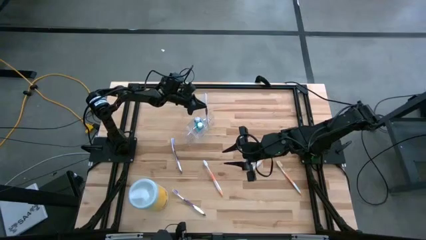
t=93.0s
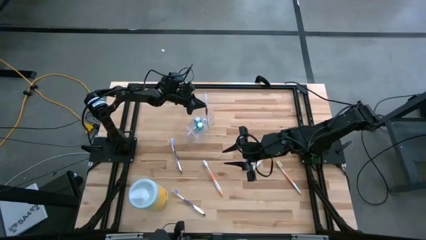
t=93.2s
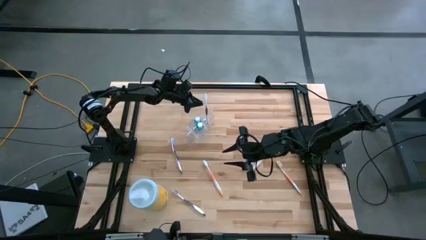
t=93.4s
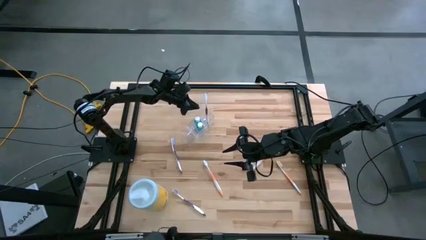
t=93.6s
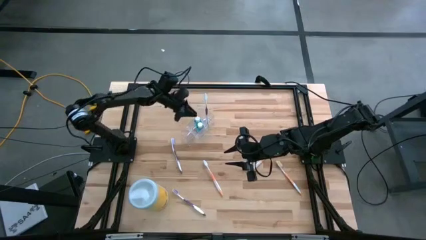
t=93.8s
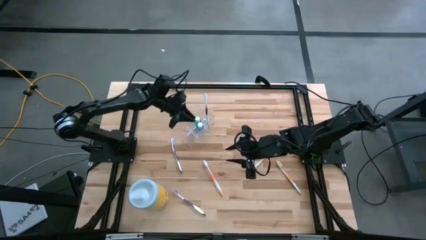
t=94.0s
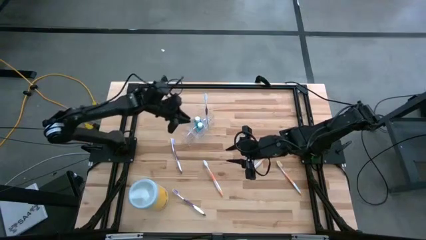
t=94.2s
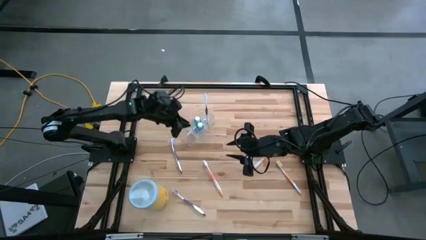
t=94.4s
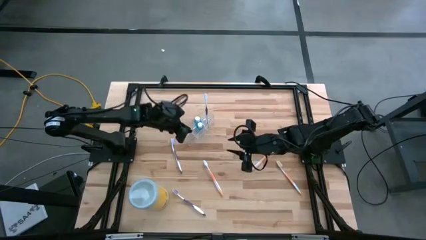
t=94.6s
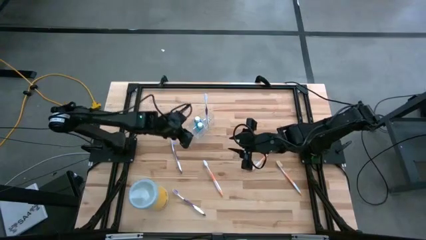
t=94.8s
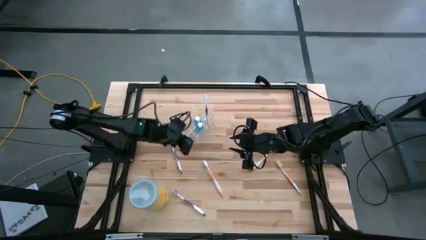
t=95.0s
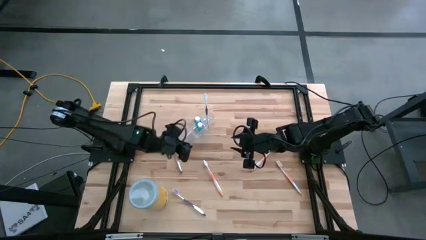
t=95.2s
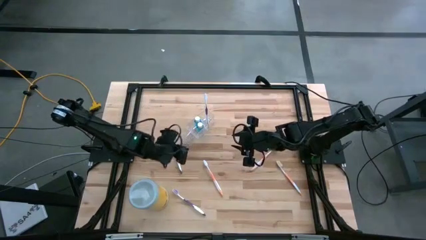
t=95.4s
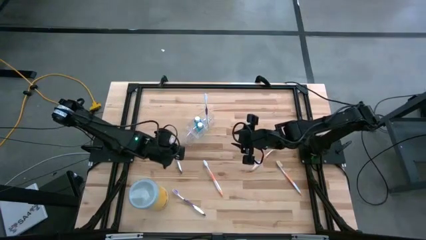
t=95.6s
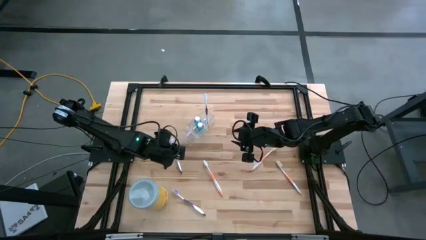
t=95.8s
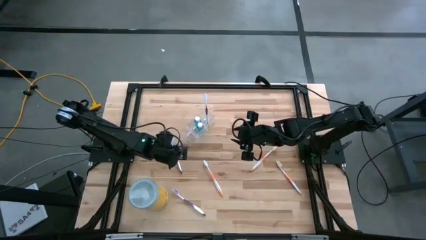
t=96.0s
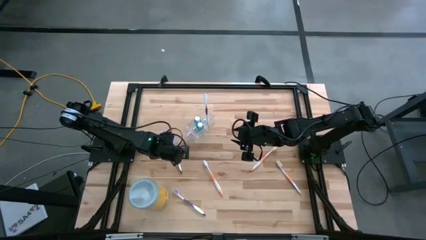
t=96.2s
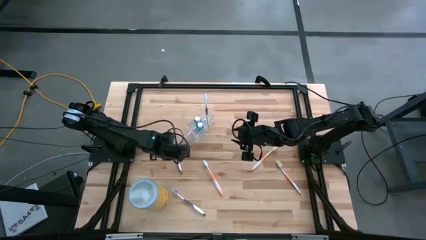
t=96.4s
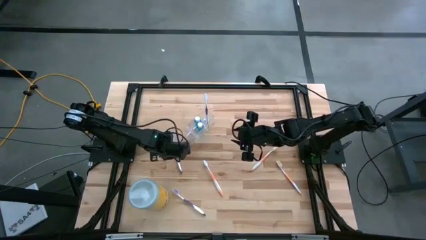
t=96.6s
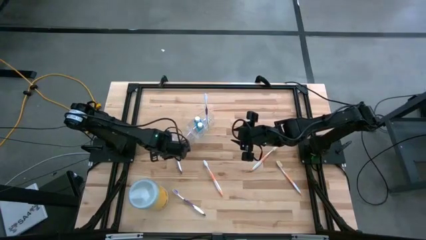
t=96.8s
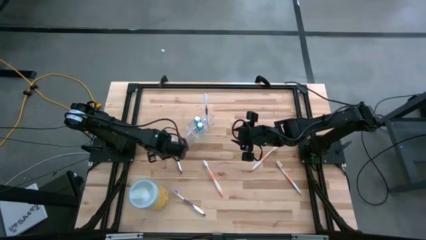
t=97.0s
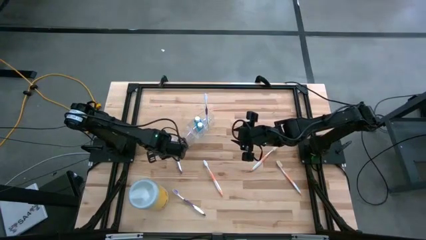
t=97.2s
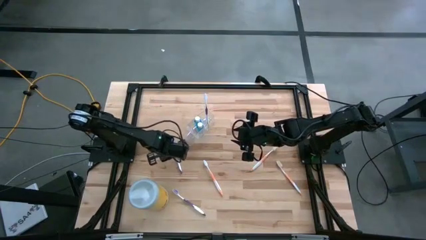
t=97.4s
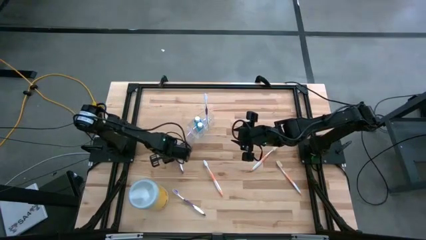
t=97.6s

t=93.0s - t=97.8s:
Task: Pick & Place toothbrushing station
Put the top violet toothbrush into the transparent organizer

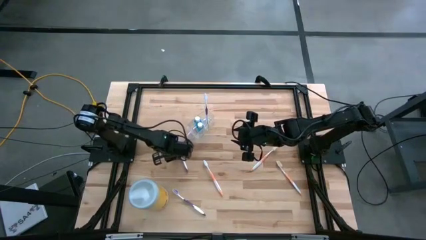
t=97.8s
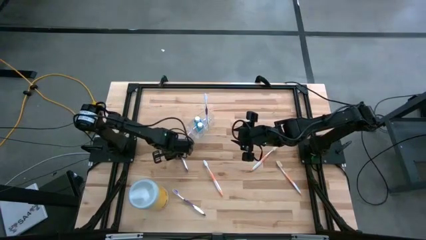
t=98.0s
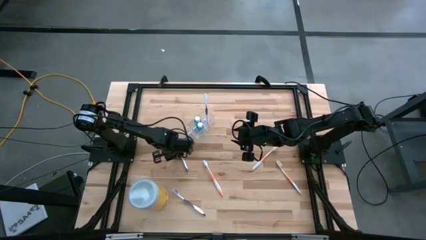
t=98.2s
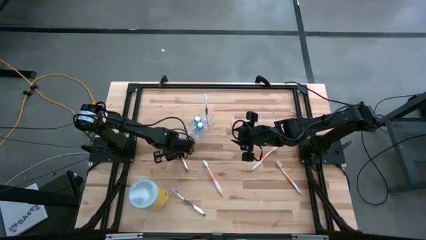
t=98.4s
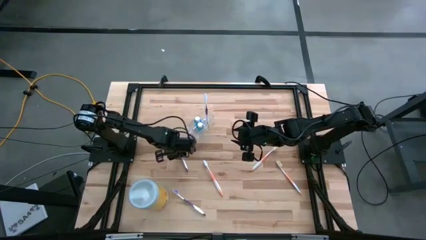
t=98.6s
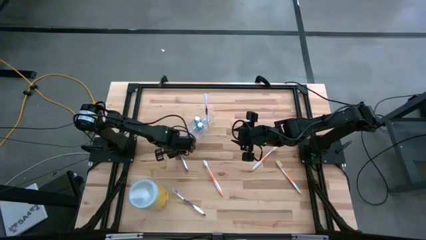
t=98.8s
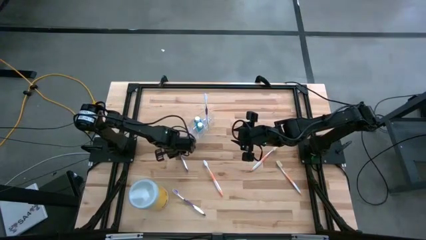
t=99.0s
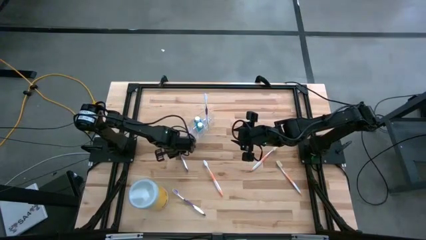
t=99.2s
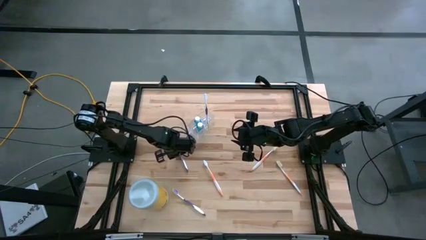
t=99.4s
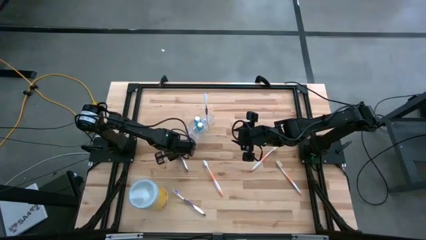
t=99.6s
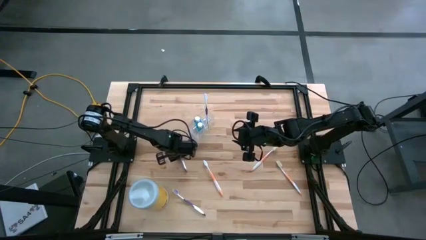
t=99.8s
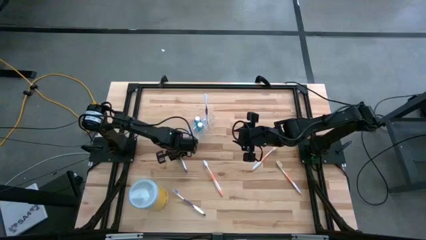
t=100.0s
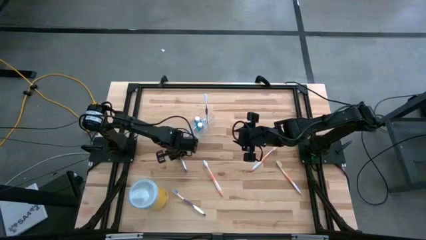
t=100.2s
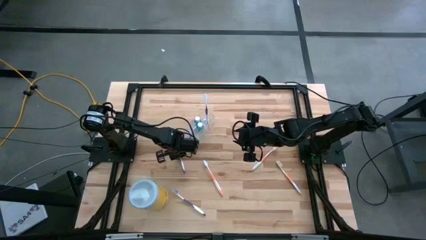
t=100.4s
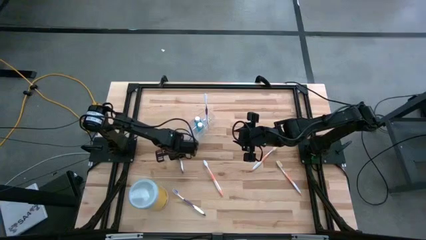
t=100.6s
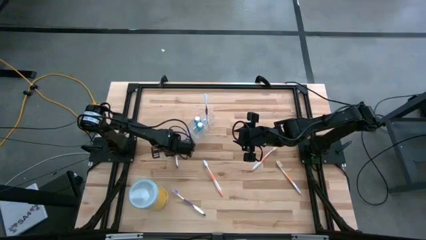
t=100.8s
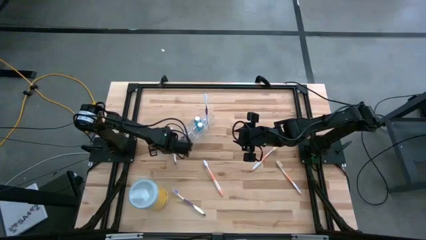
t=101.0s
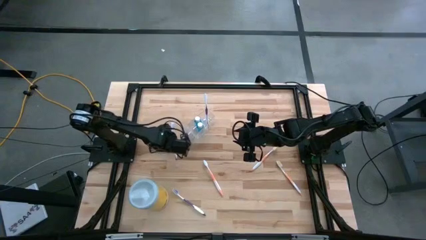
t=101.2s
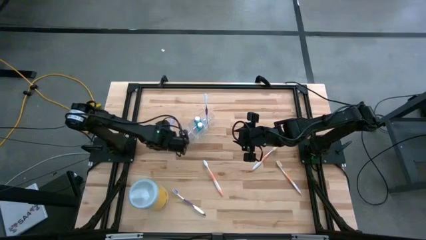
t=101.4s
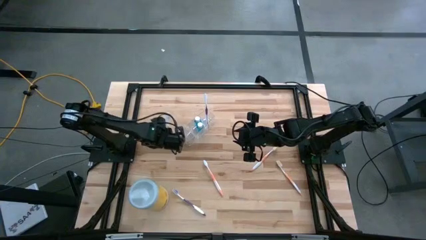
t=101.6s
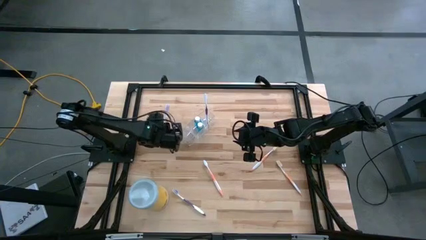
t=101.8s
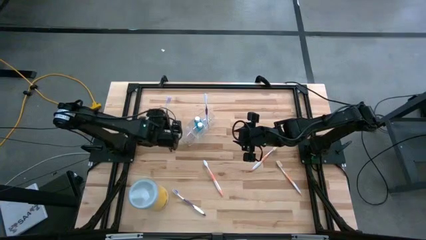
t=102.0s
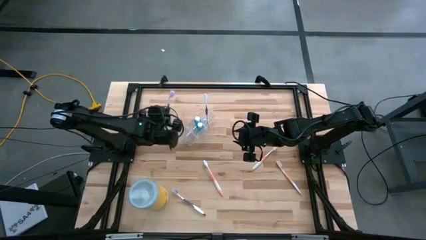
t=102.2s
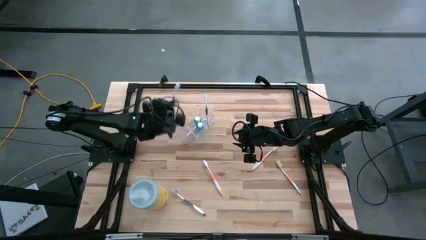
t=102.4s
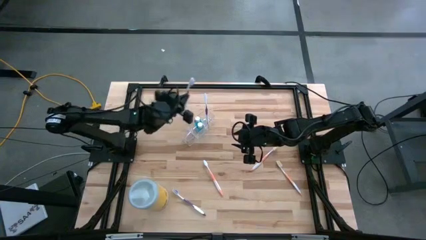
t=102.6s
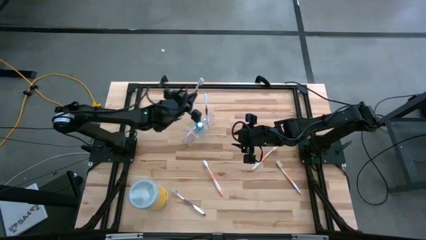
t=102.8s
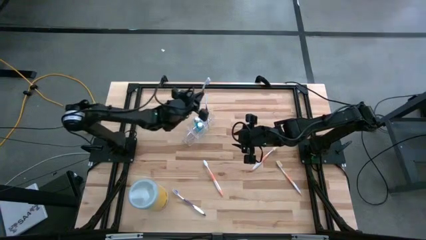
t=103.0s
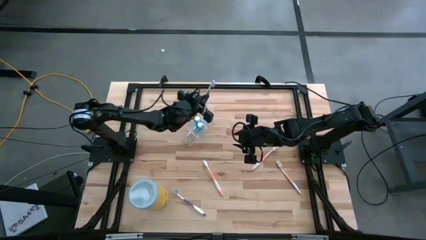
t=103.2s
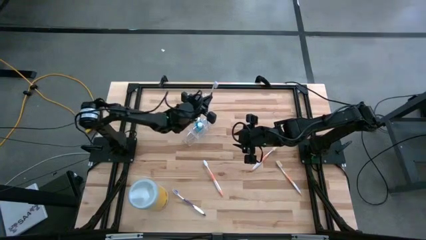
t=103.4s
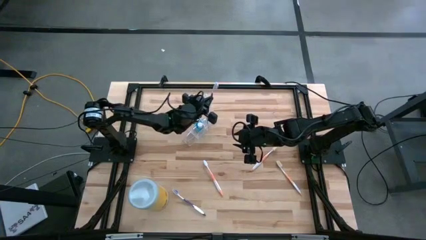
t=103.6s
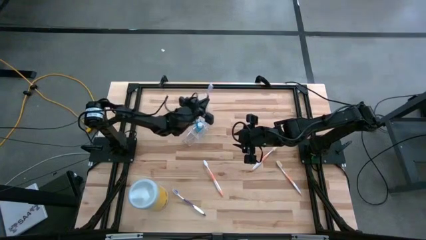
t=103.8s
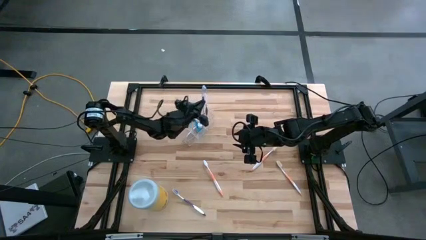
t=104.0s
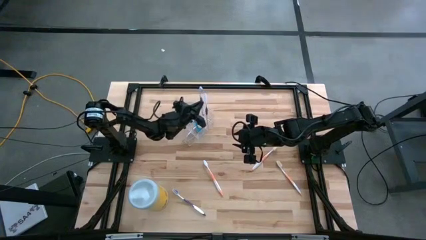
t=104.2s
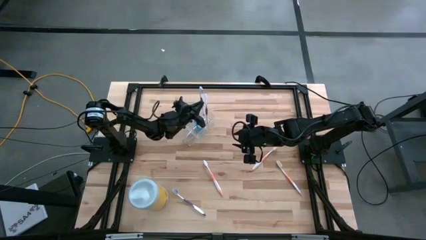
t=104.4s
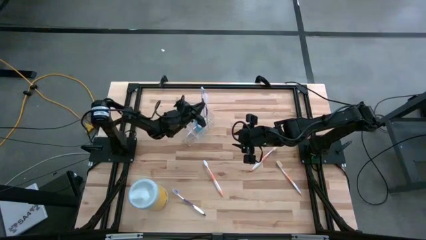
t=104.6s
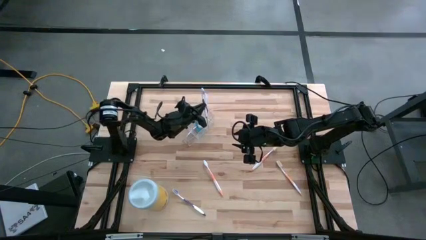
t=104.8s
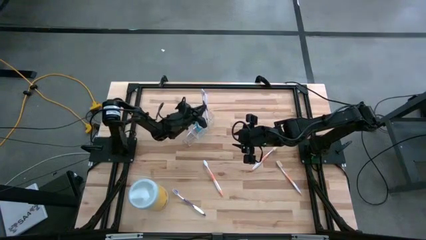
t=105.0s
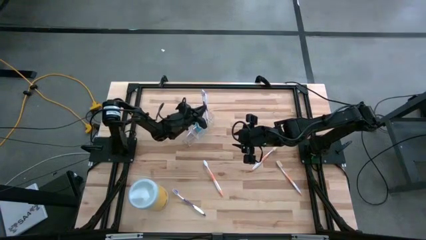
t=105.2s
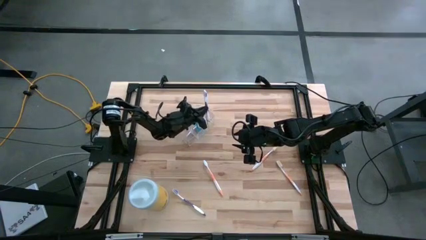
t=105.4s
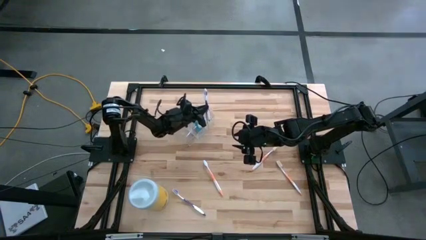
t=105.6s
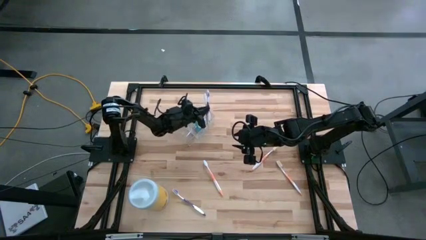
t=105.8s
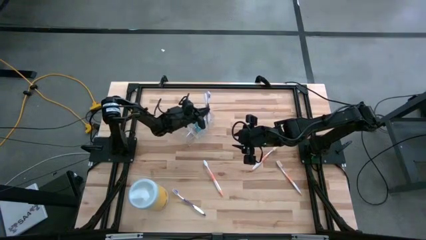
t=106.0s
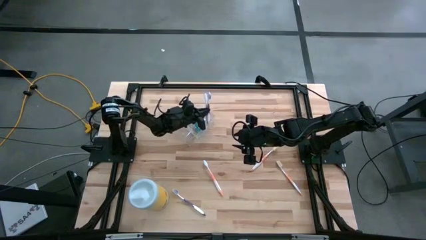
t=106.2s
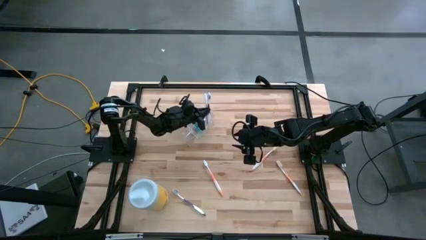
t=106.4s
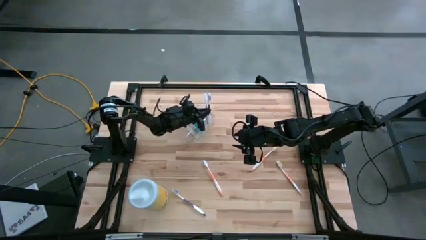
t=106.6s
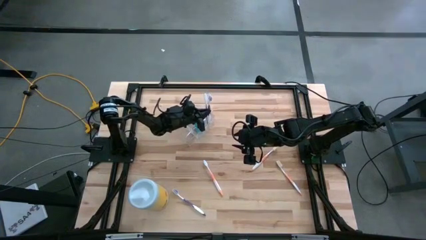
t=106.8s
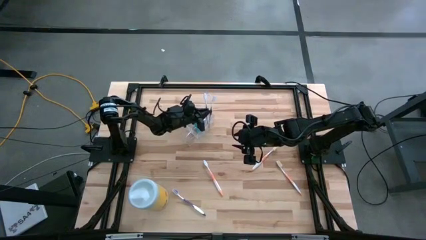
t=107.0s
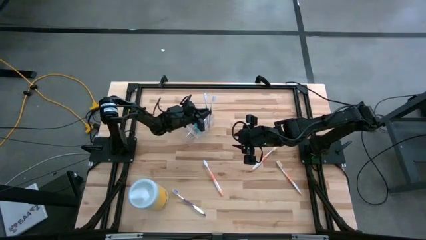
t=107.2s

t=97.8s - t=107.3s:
Put the top violet toothbrush into the transparent organizer
